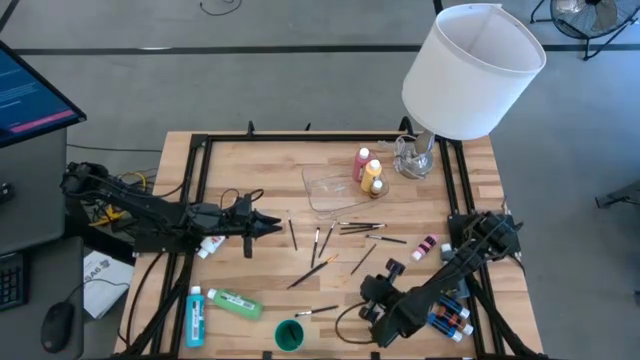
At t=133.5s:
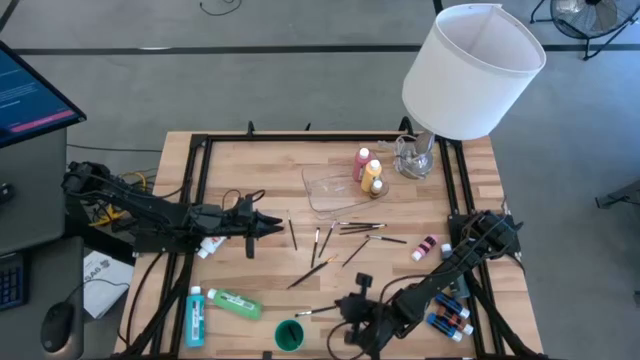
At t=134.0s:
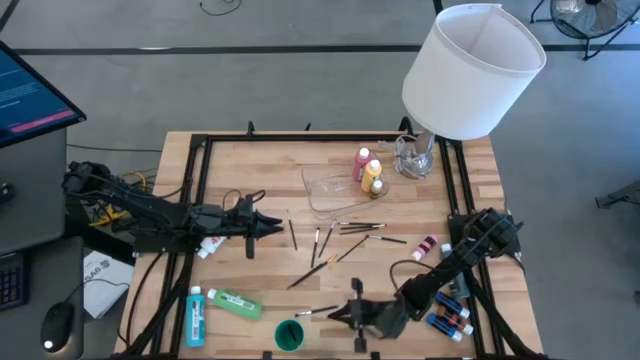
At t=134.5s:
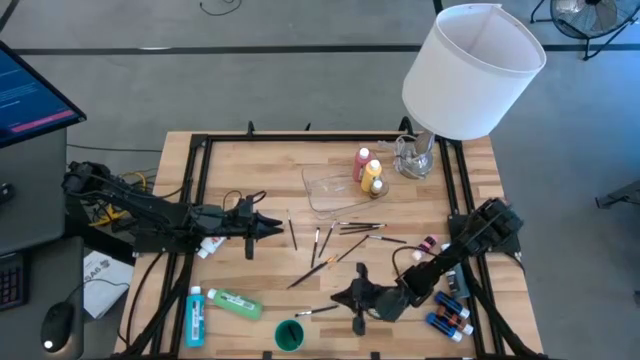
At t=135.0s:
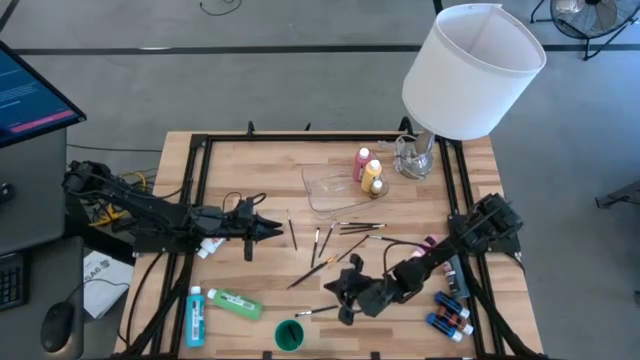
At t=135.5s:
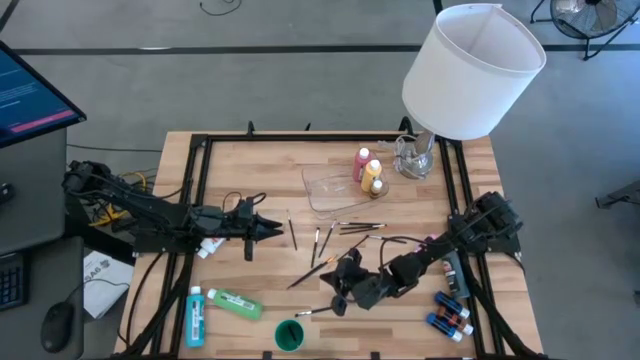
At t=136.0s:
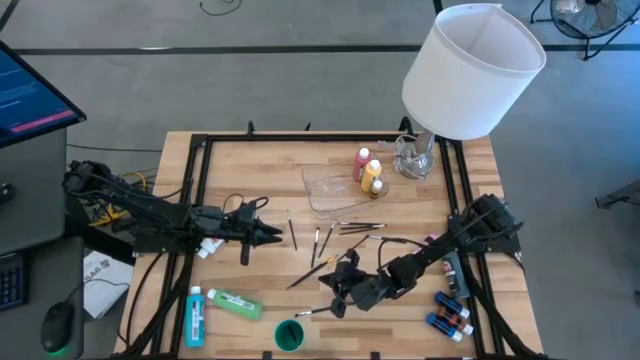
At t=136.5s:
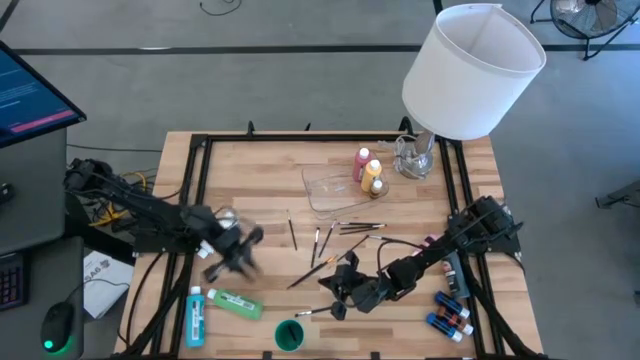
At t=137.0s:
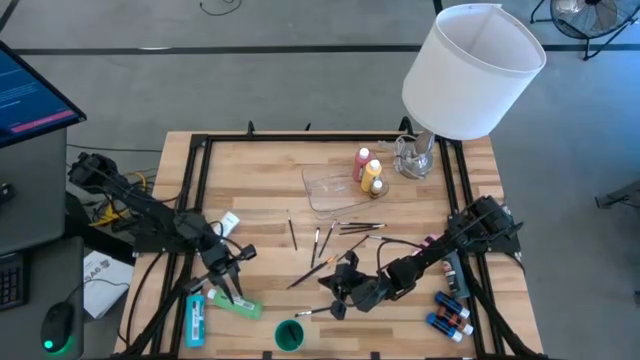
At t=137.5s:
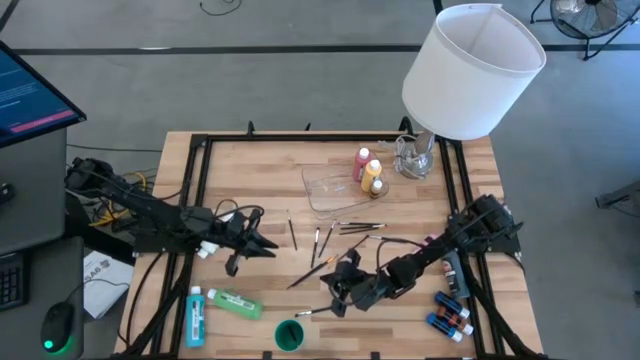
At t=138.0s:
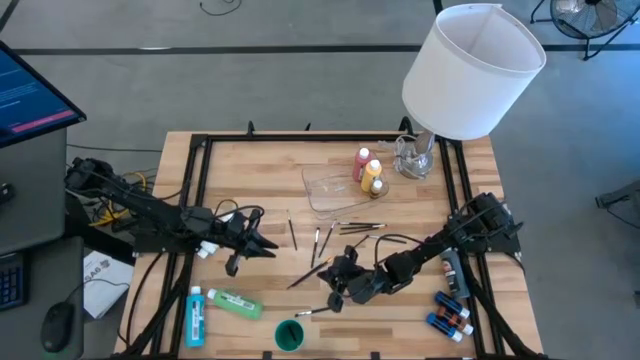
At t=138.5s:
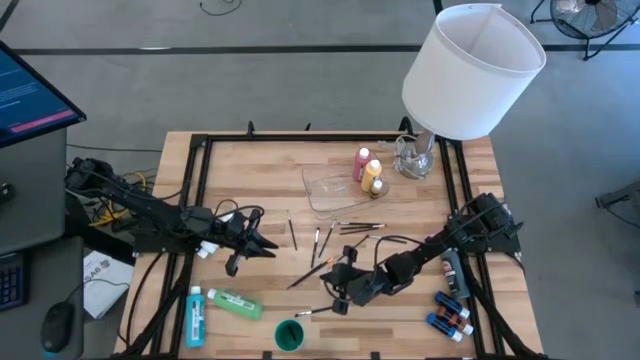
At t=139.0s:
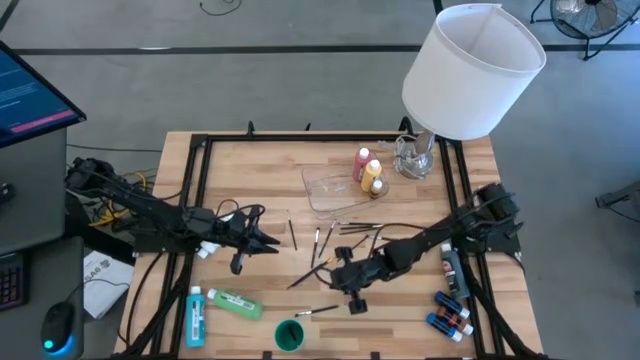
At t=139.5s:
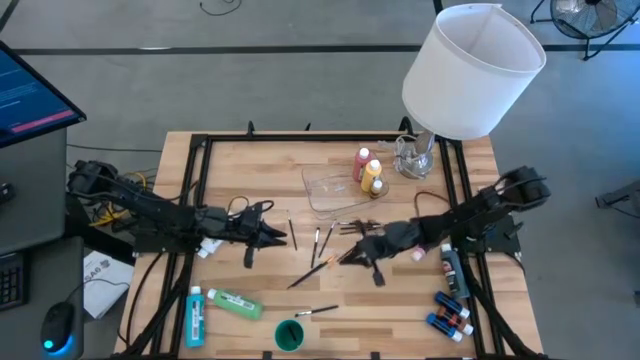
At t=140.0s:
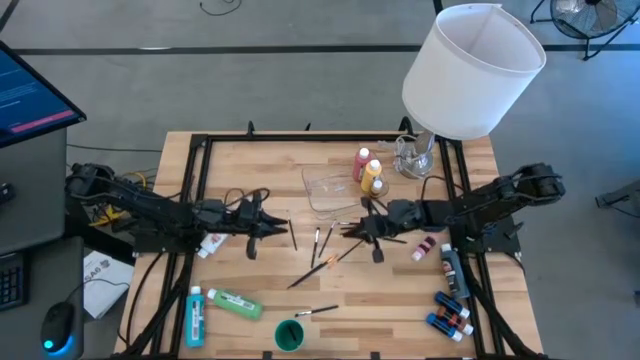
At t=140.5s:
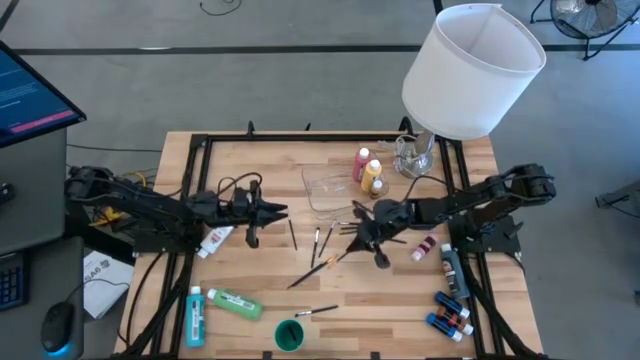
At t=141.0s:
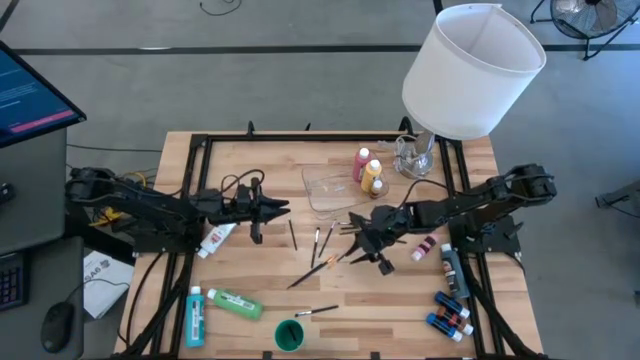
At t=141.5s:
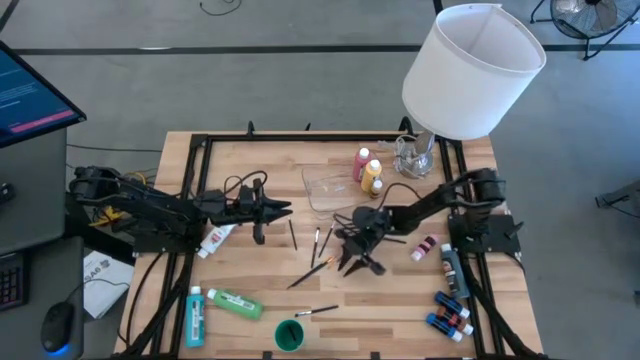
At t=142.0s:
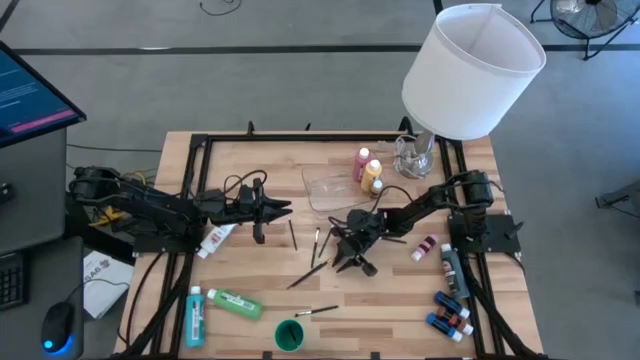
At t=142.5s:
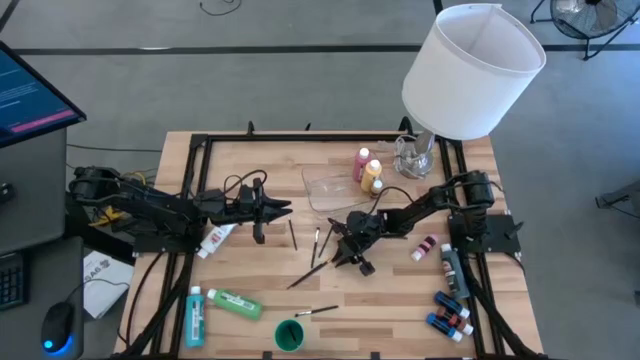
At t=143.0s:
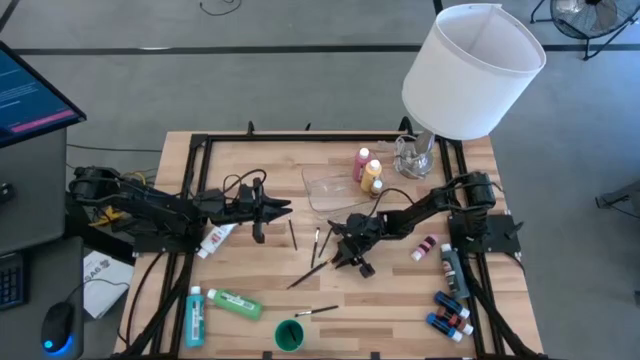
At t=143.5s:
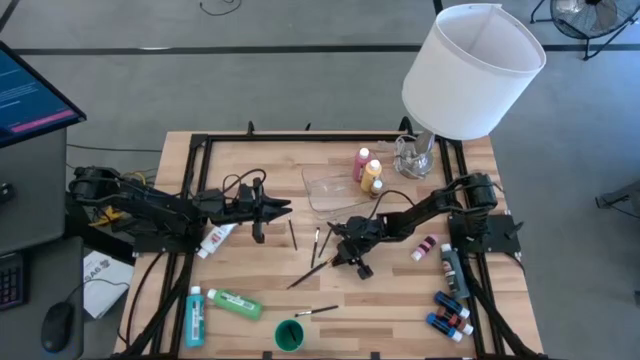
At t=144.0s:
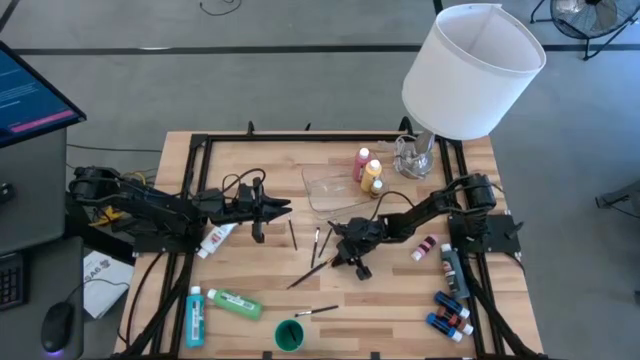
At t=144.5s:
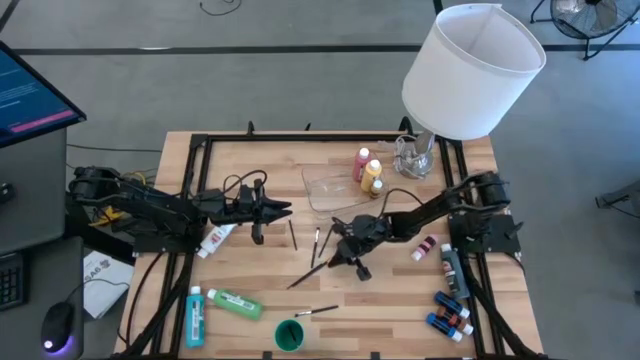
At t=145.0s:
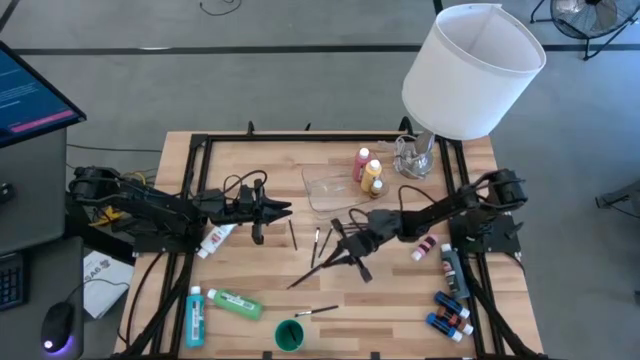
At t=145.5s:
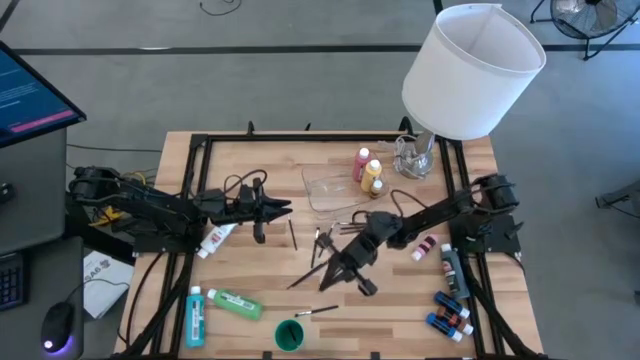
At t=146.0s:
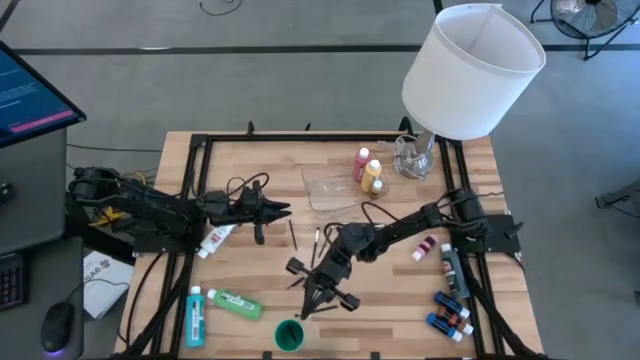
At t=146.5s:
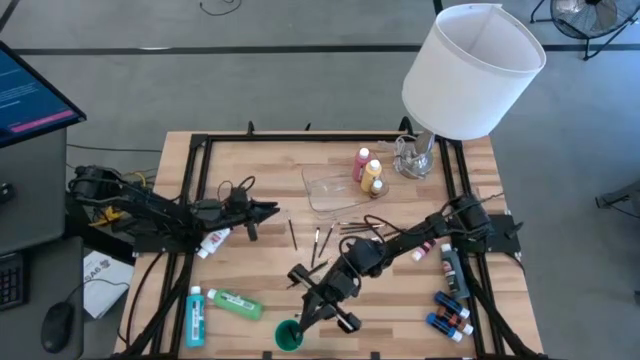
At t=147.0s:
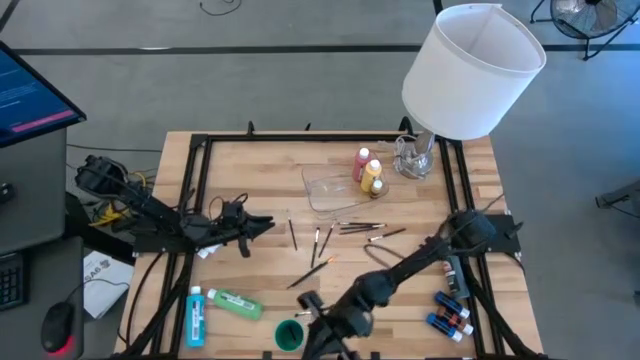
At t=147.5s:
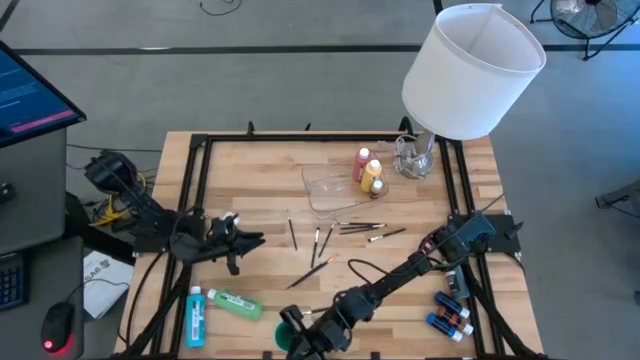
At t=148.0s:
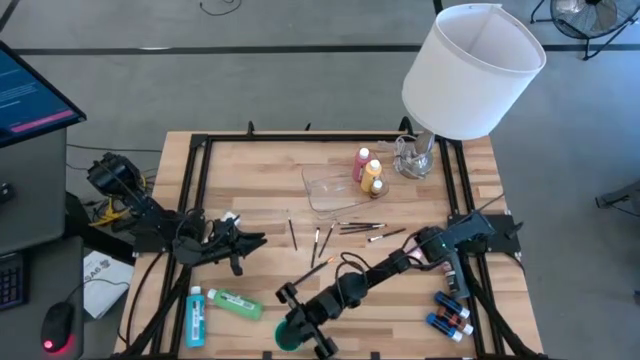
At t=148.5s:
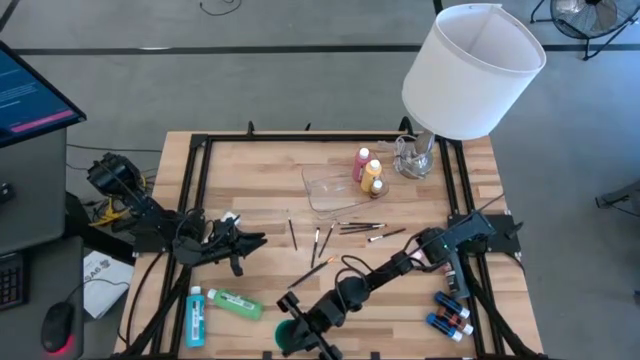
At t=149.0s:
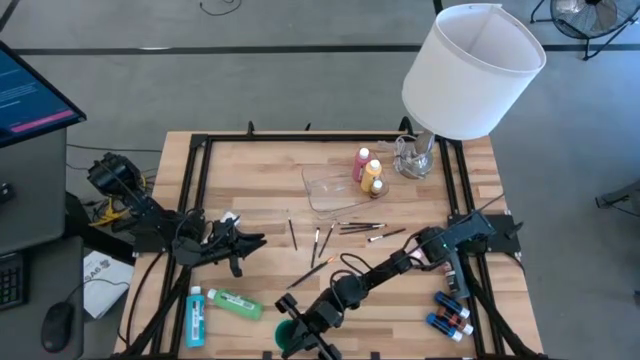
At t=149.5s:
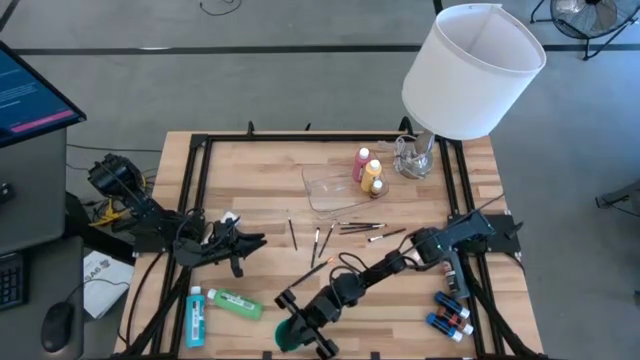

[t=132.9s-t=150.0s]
Task: Pick & Place Paint Supplies
Put the gold paintbrush into the green cup
